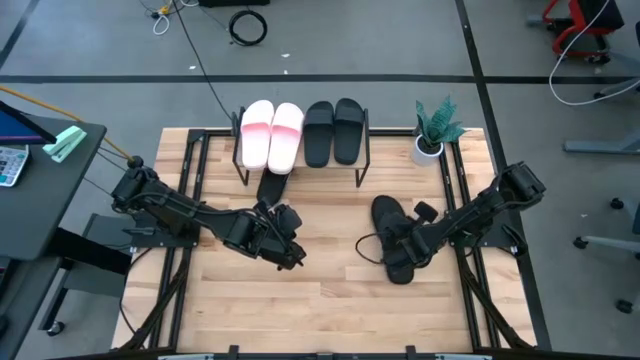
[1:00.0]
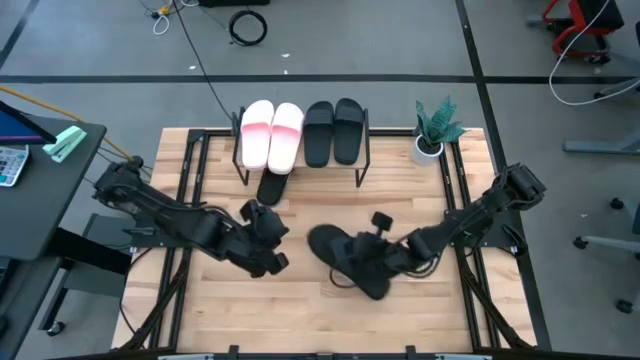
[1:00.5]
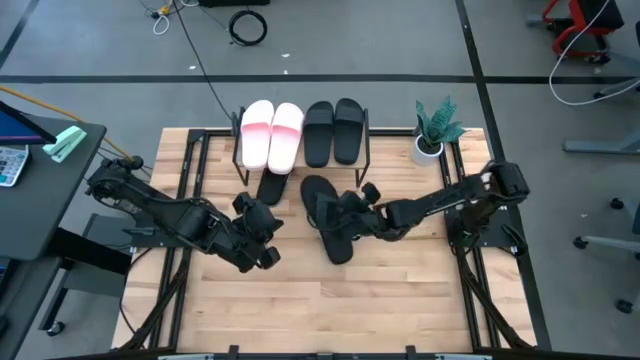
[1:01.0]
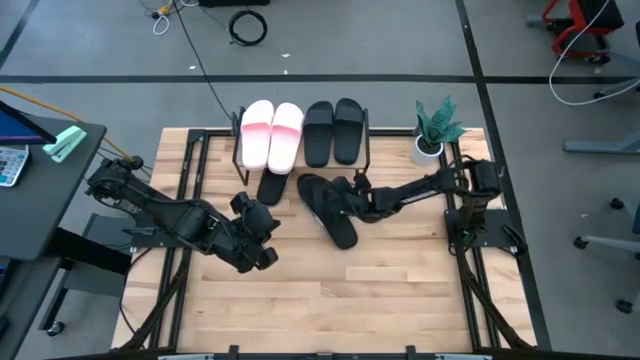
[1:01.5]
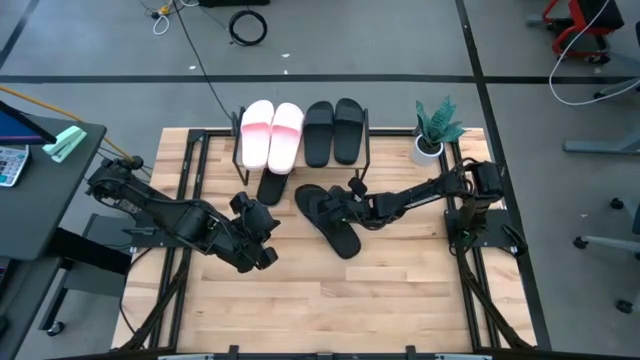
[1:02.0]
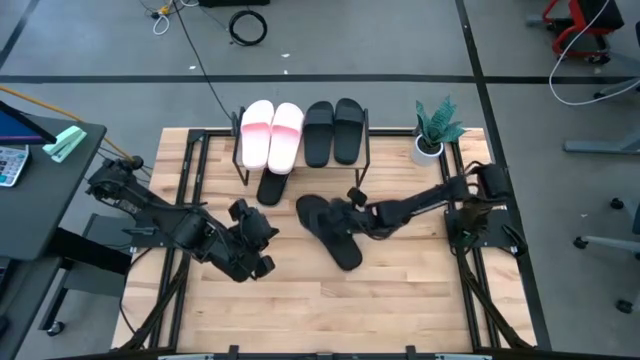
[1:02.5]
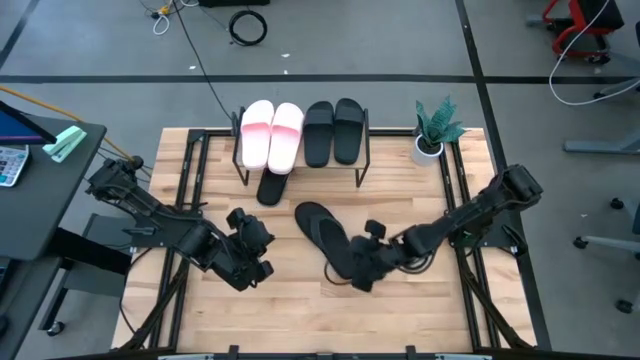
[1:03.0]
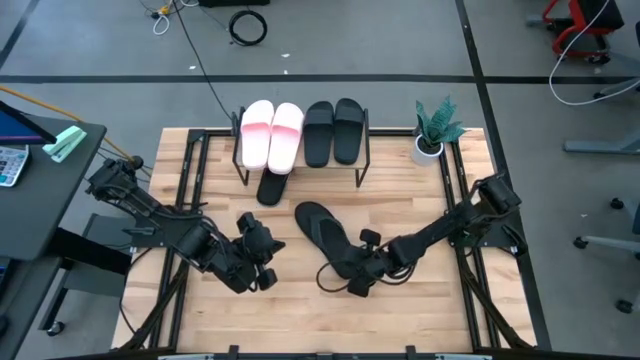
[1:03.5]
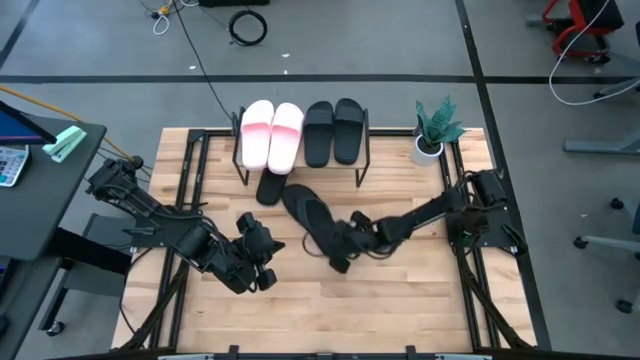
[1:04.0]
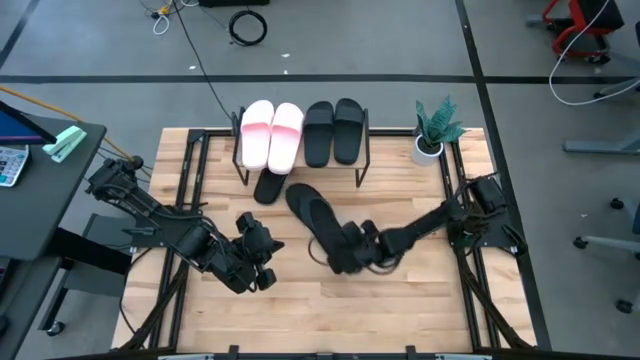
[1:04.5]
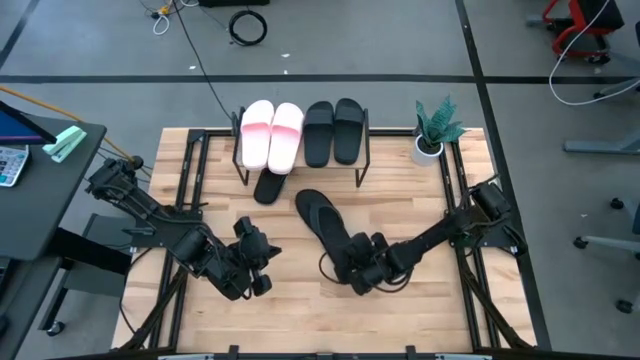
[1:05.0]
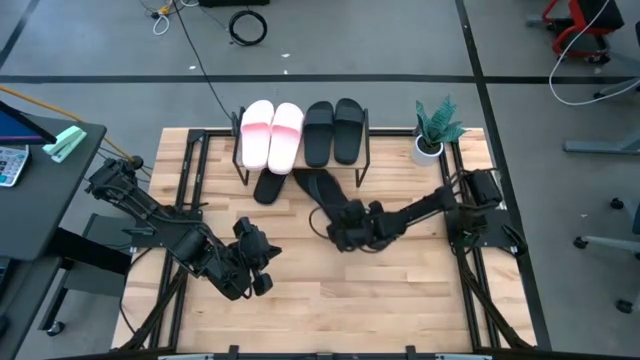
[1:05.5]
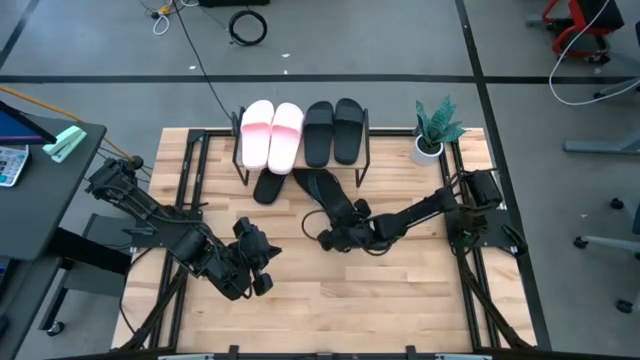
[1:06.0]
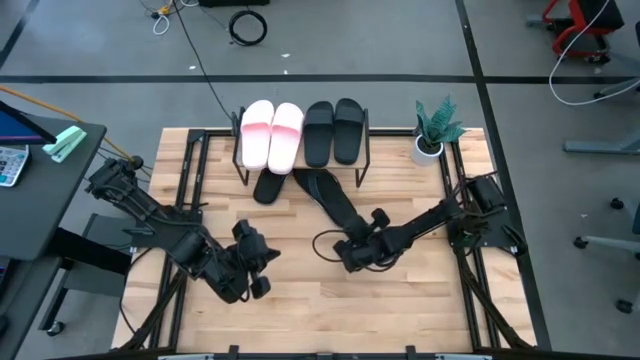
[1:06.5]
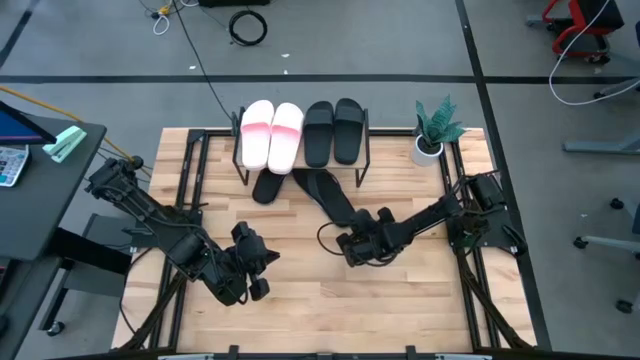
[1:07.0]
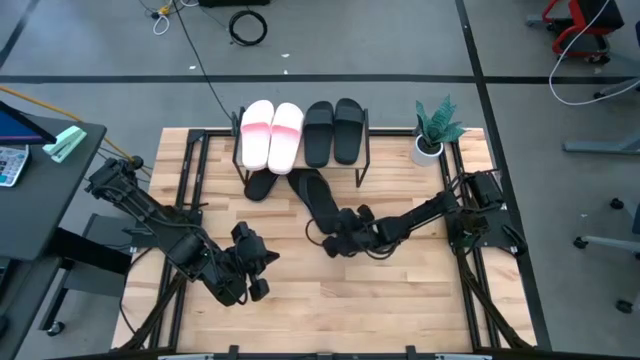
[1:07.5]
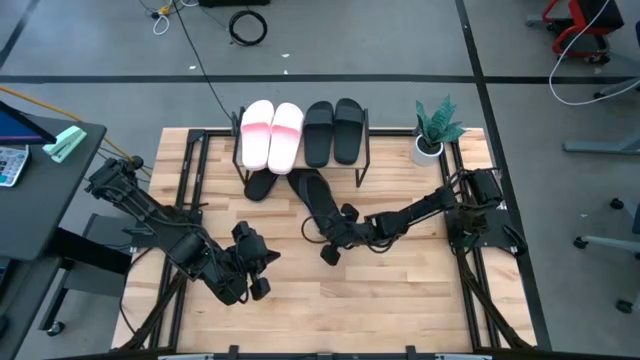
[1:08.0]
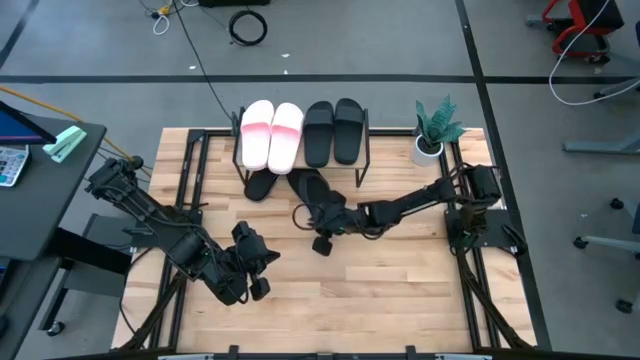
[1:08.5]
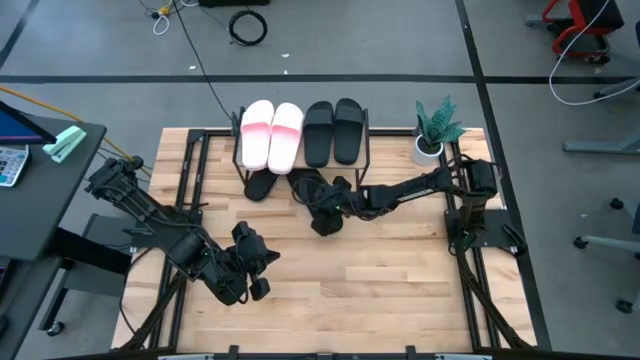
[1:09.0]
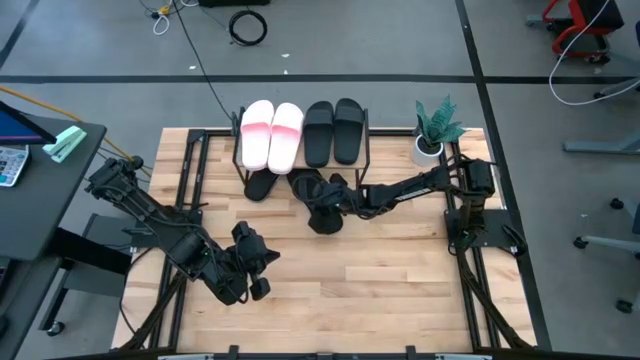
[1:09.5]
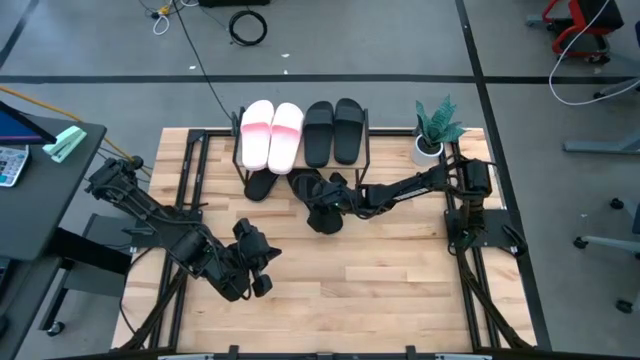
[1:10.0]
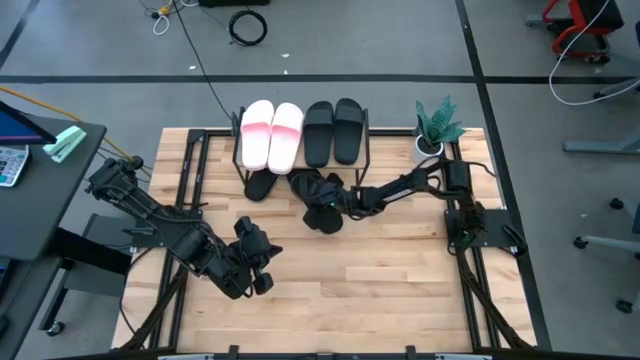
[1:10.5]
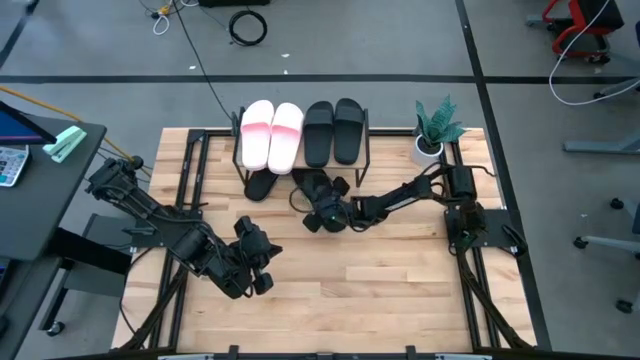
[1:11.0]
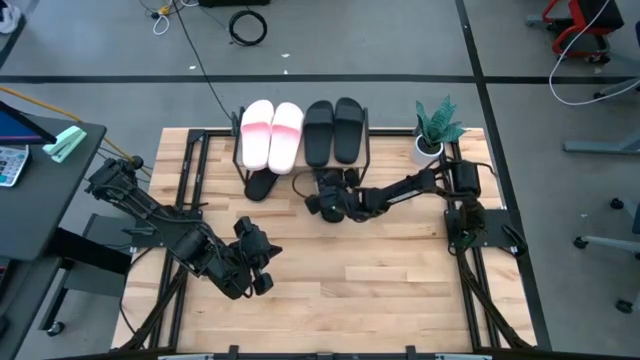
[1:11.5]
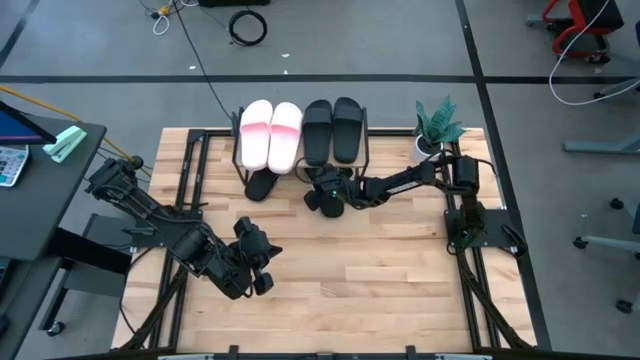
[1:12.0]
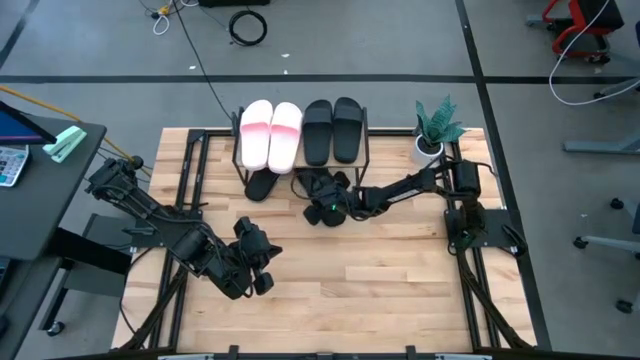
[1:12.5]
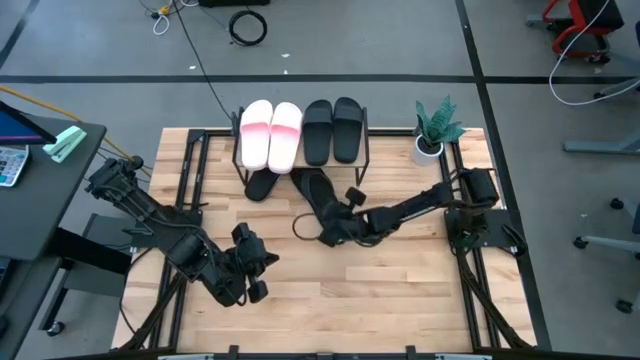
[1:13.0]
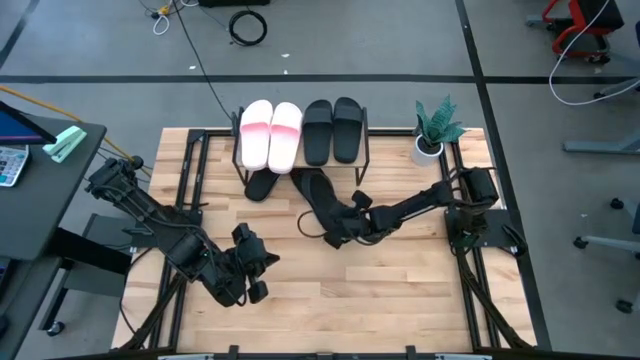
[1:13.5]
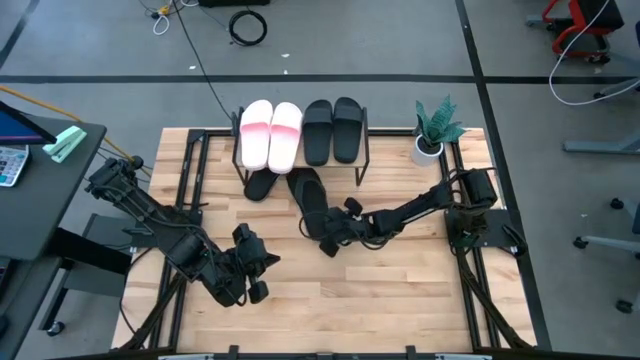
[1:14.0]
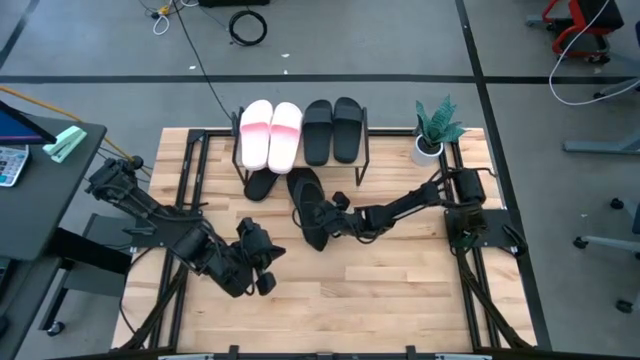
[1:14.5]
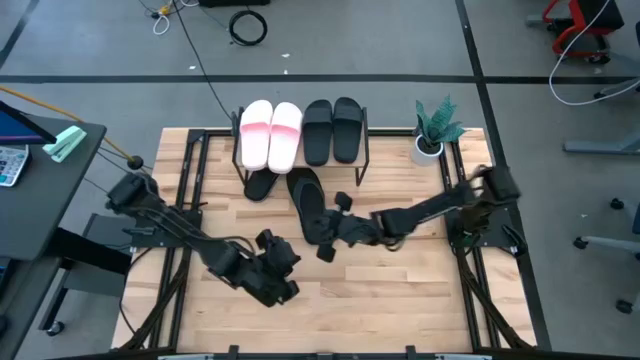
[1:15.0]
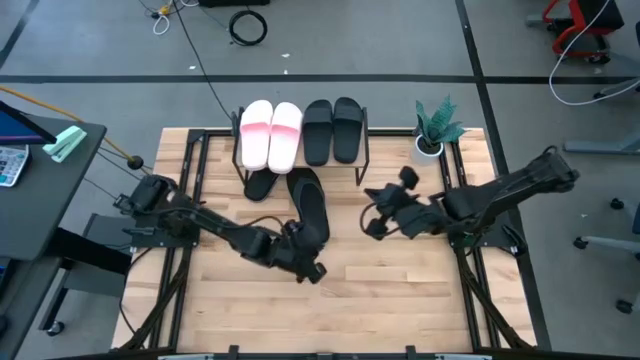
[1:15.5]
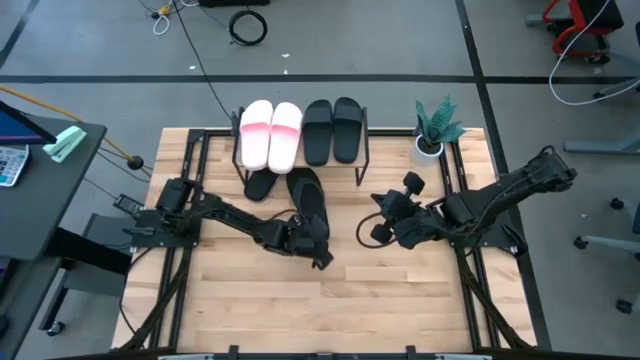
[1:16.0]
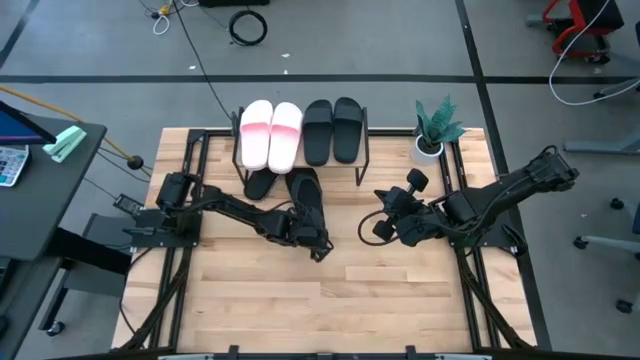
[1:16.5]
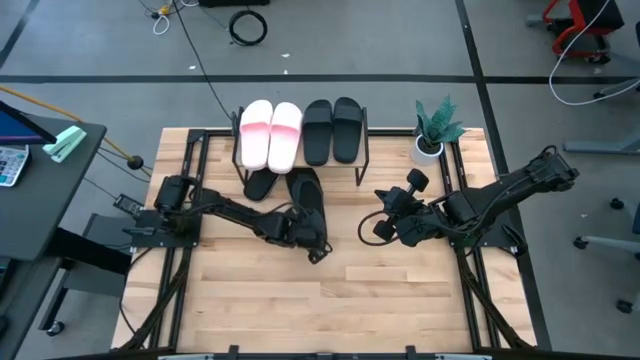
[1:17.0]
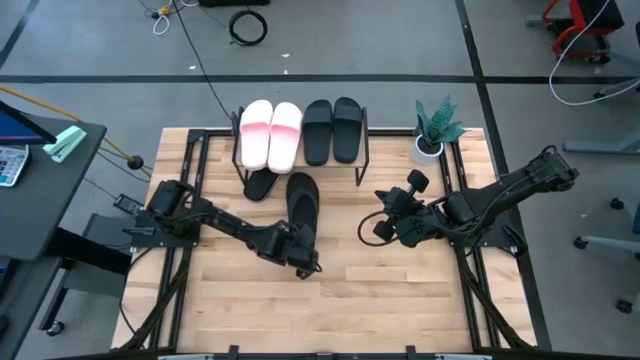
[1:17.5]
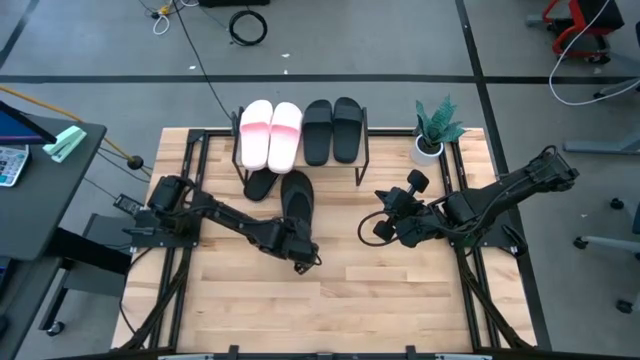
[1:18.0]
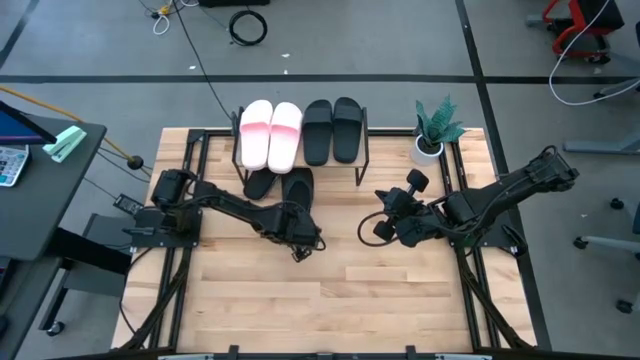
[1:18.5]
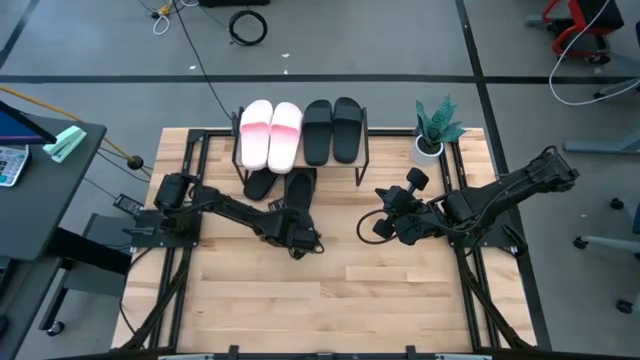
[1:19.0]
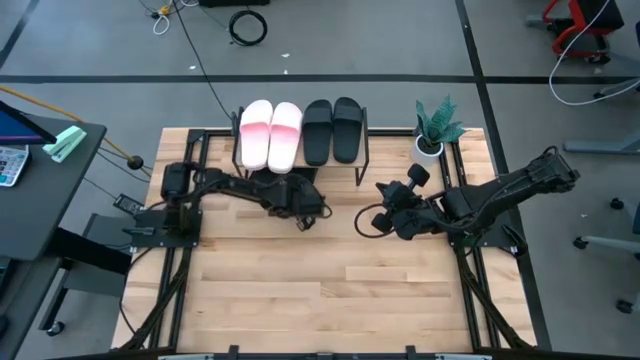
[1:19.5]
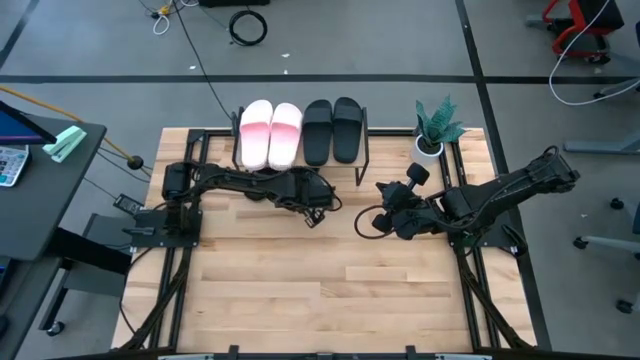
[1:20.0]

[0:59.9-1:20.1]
Task: Pick and place slides into the shelf
Move the black slipper under the shelf
